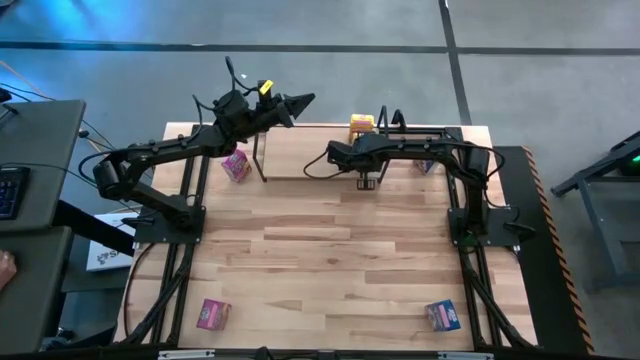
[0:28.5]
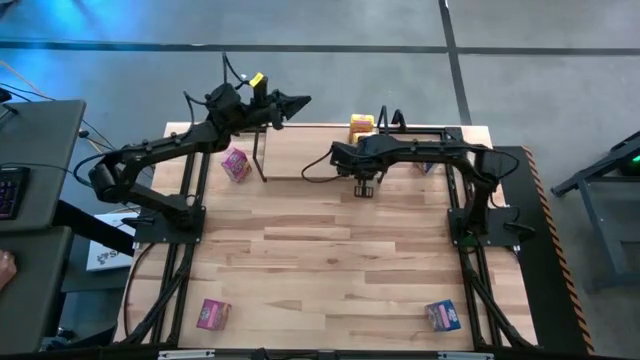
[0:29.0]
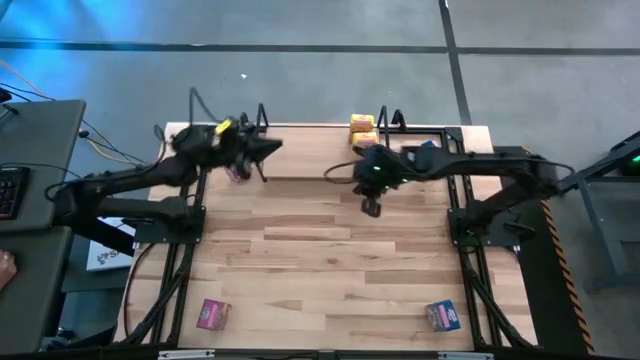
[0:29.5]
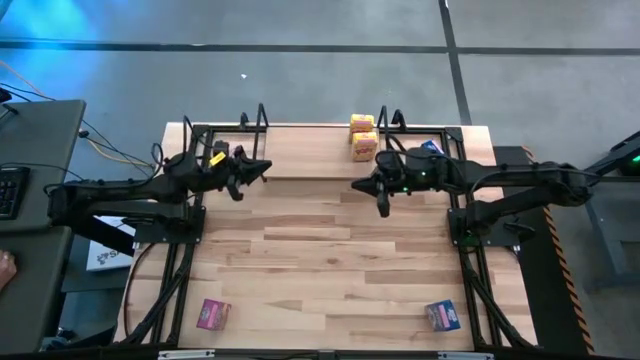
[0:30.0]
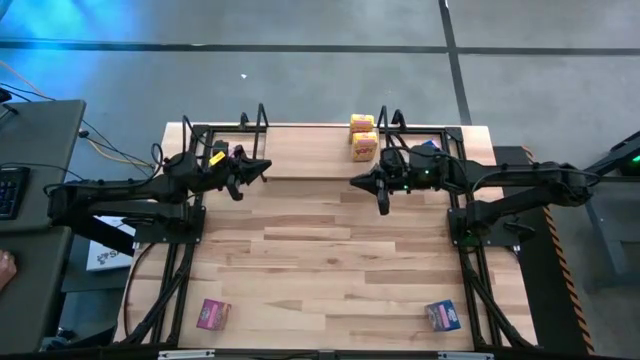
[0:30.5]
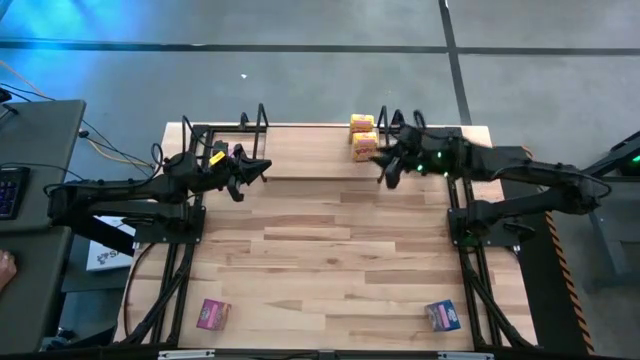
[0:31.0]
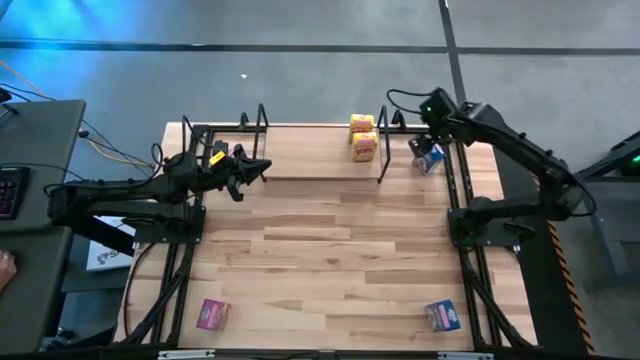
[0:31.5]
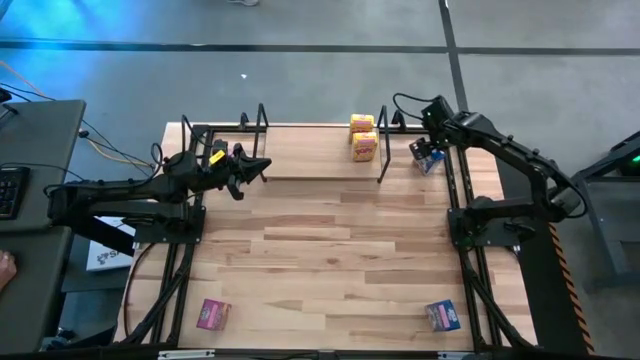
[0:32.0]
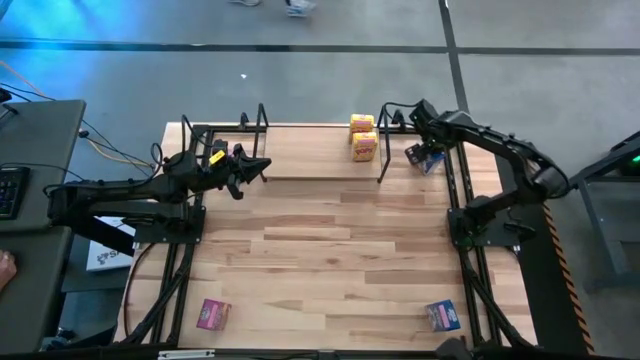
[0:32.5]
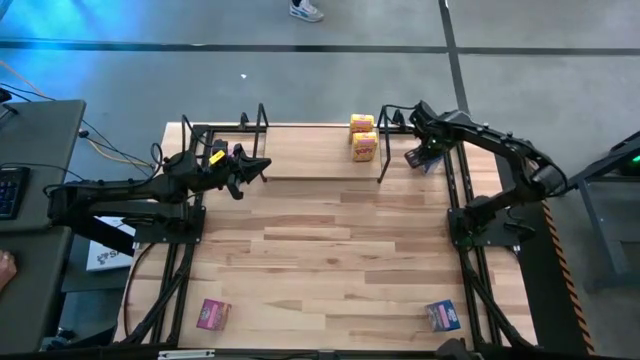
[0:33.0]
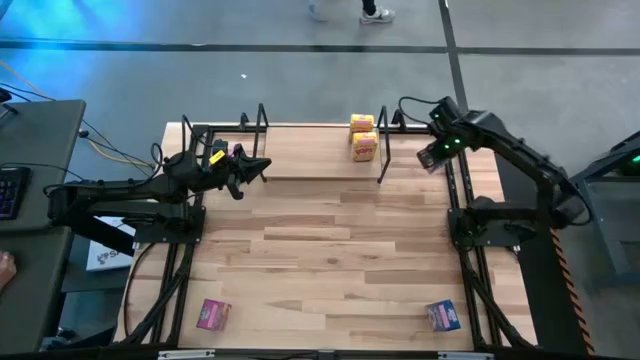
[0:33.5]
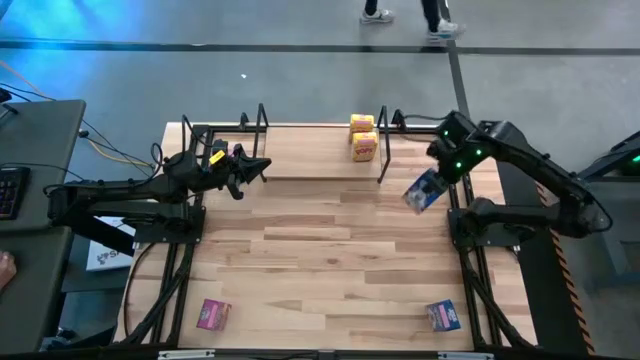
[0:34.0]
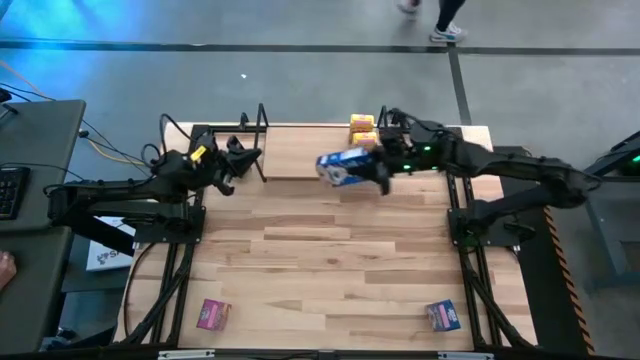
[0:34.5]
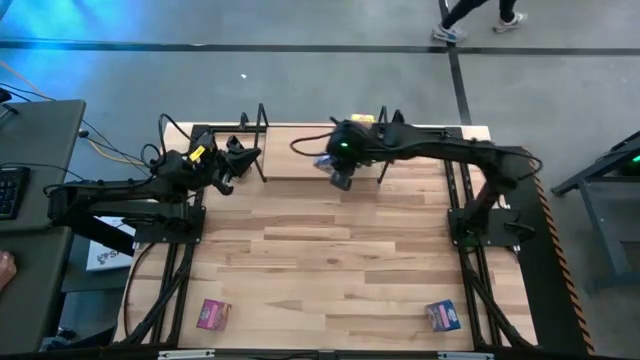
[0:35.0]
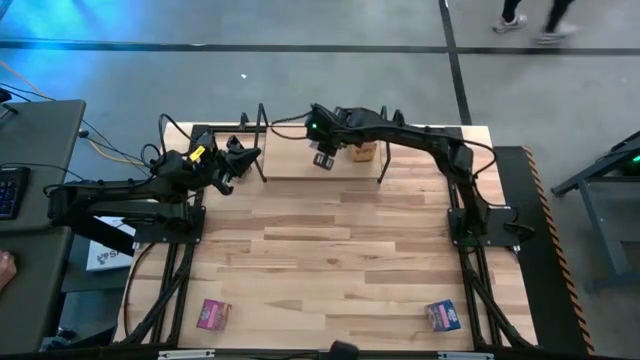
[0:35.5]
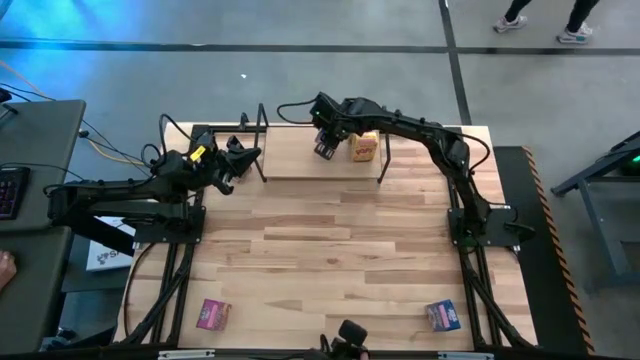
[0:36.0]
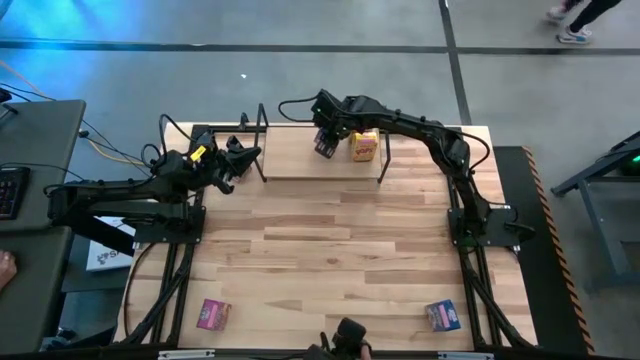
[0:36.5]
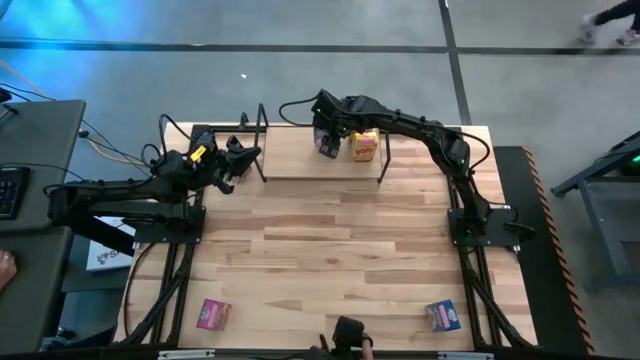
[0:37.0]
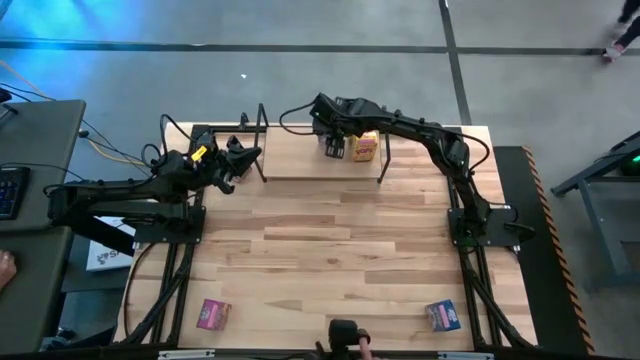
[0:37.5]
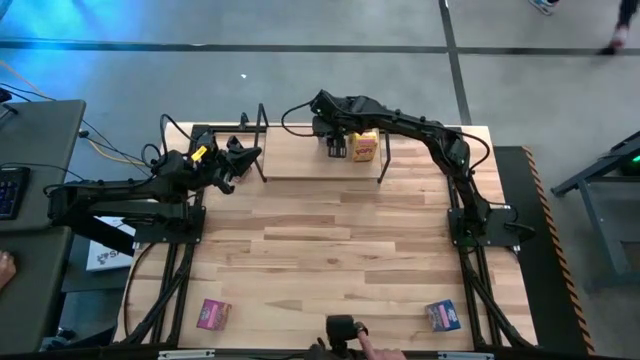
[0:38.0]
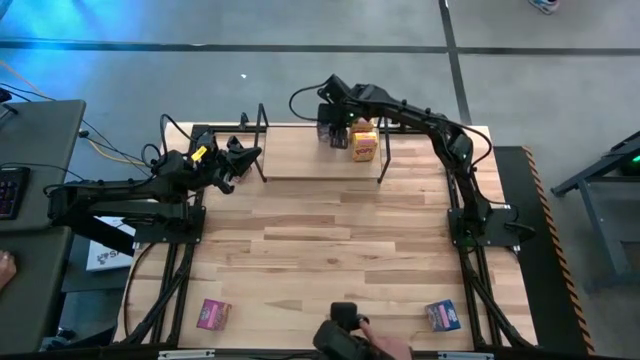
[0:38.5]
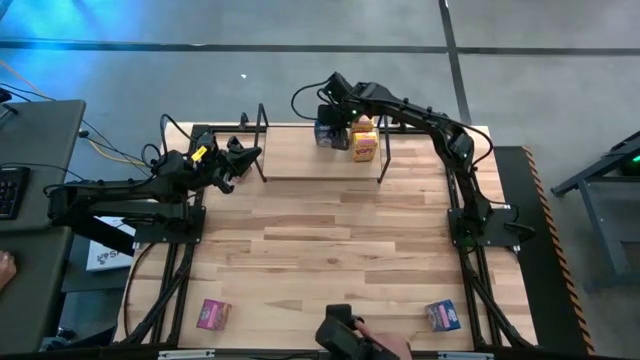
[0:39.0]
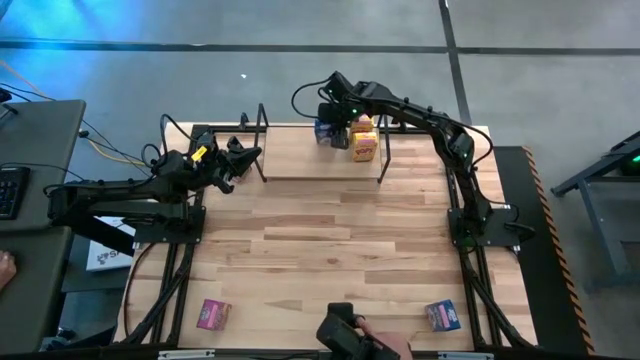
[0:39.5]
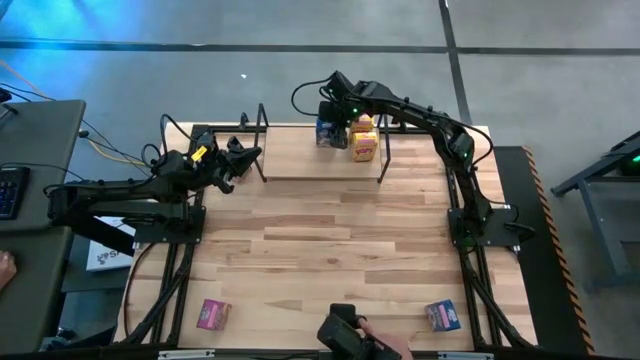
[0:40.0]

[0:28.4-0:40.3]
Task: Stack cereal on shelf
Put the top right blue cereal box on the shelf

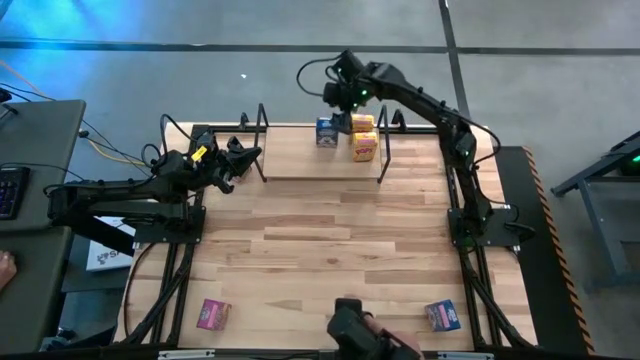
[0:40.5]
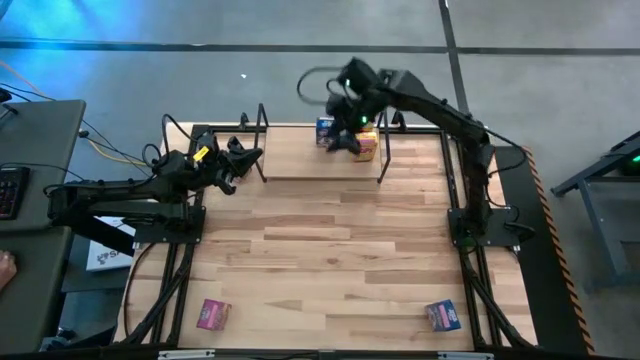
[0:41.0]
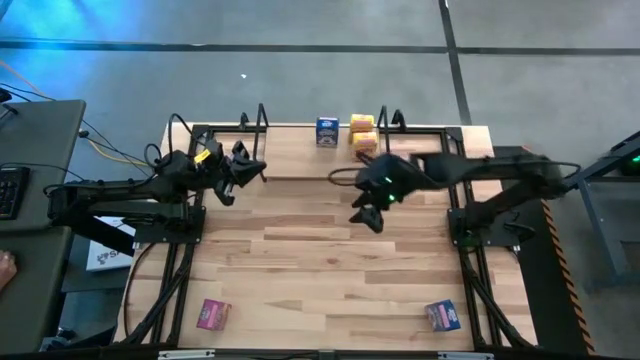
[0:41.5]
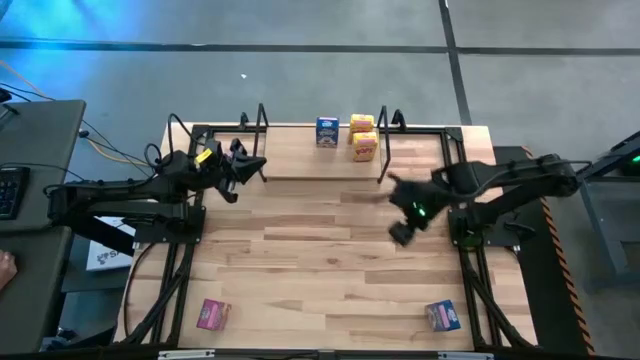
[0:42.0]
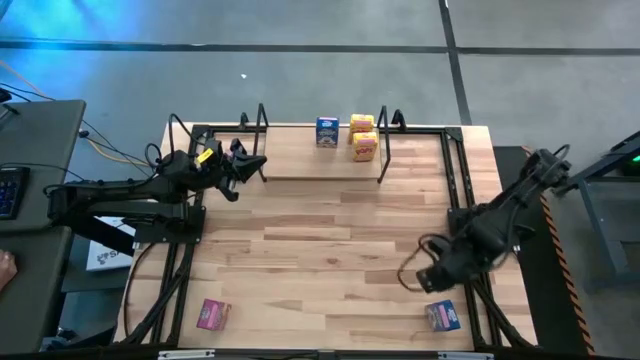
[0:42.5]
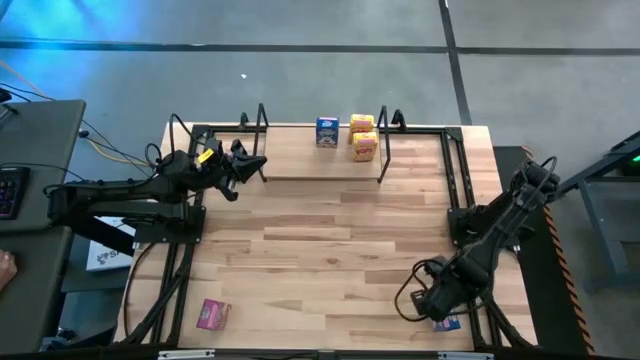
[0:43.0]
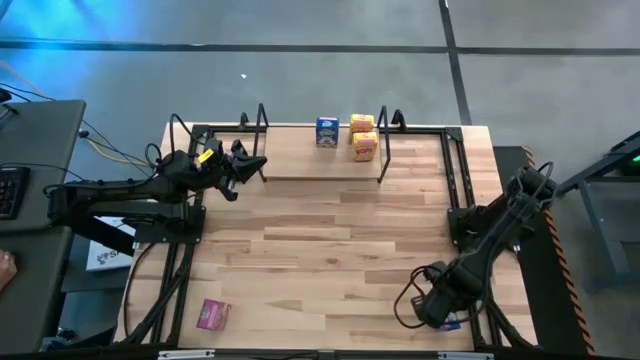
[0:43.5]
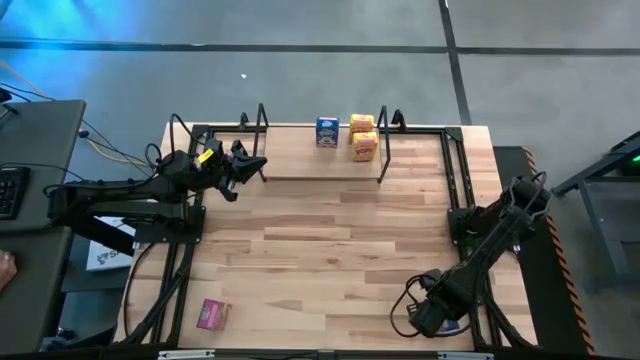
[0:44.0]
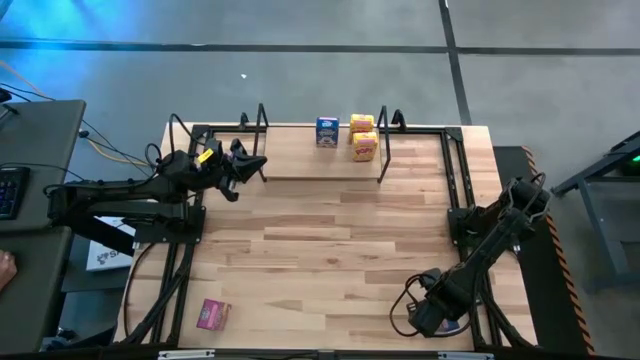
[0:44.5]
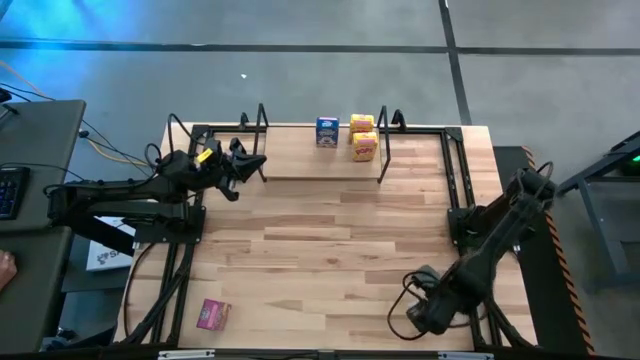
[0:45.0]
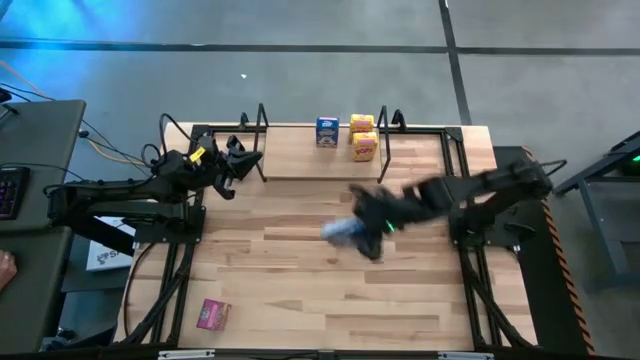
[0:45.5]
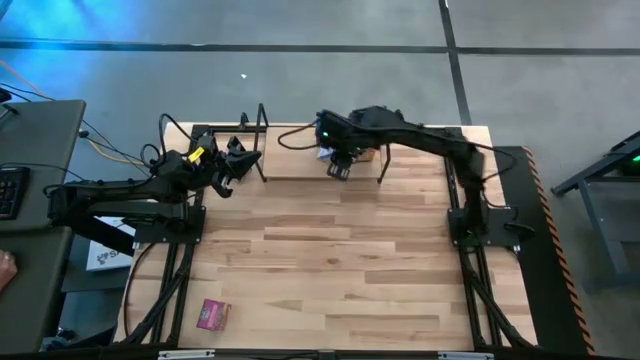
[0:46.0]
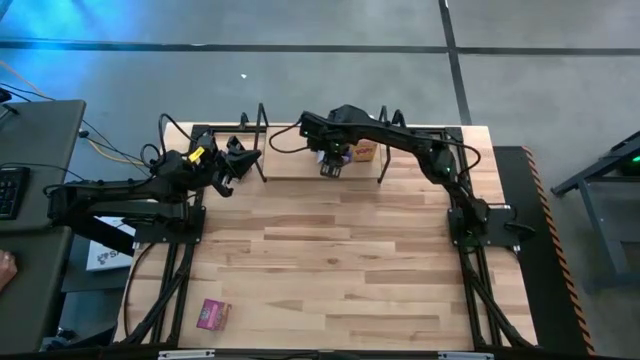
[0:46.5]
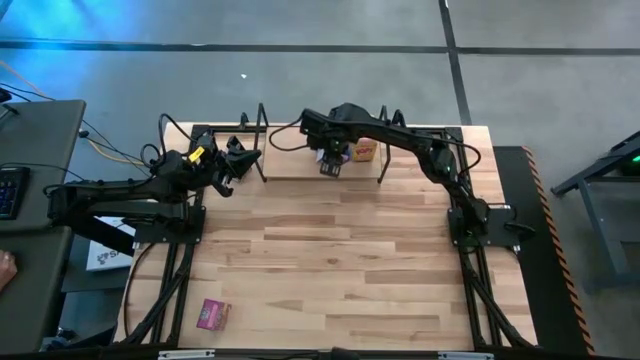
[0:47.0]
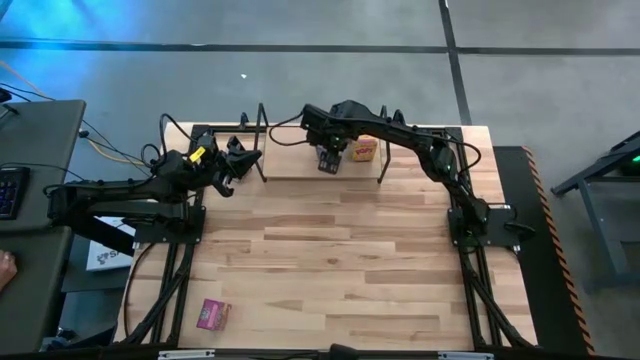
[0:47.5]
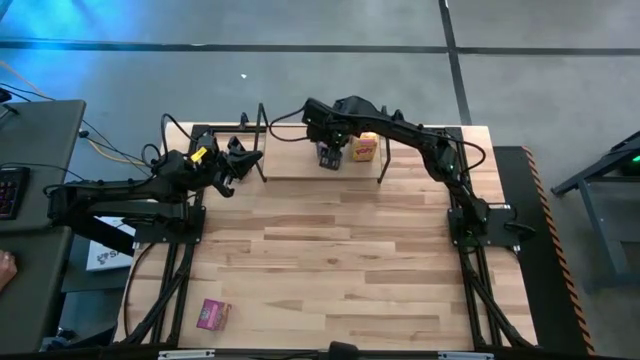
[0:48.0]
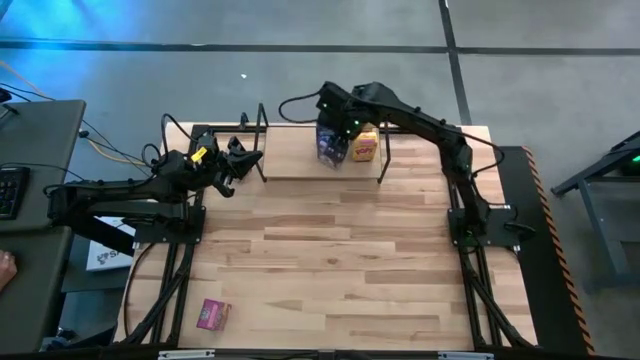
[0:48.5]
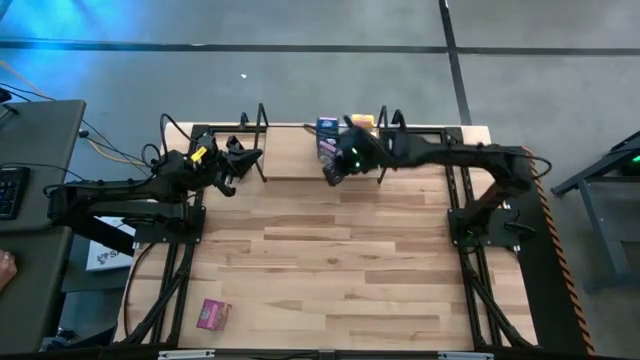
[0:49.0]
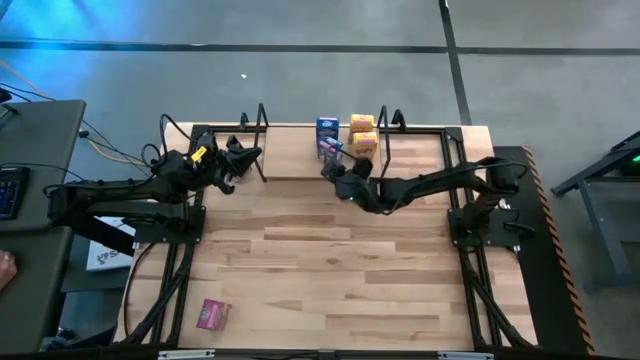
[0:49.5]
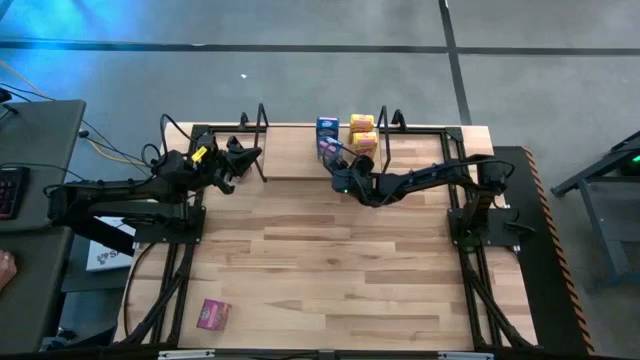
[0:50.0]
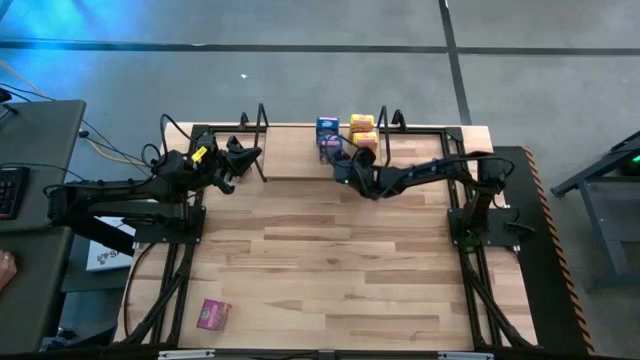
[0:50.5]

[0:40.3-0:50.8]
Put the blue cereal box on the shelf aligned with the other blue cereal box
